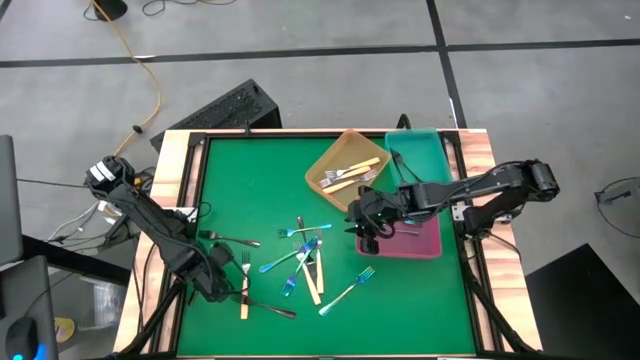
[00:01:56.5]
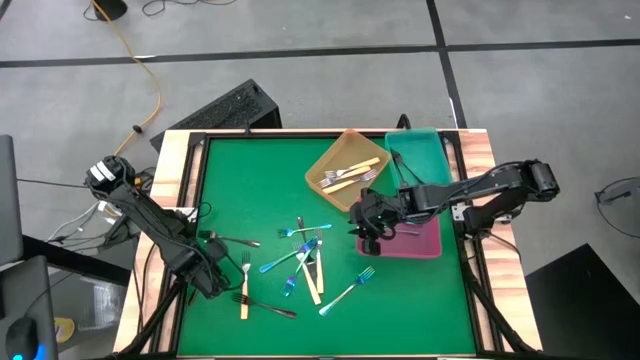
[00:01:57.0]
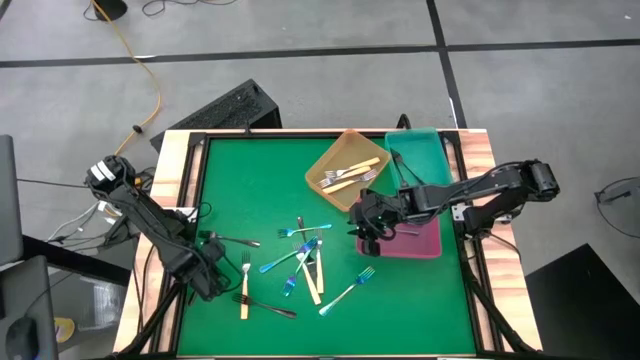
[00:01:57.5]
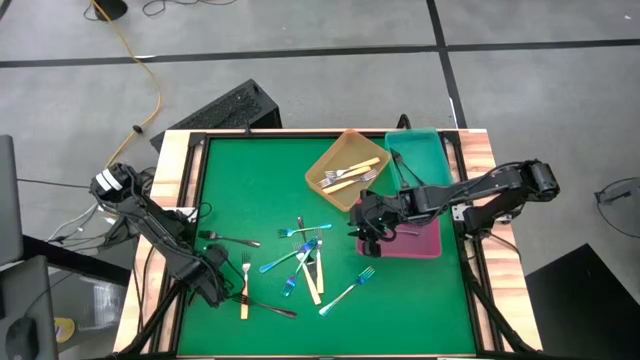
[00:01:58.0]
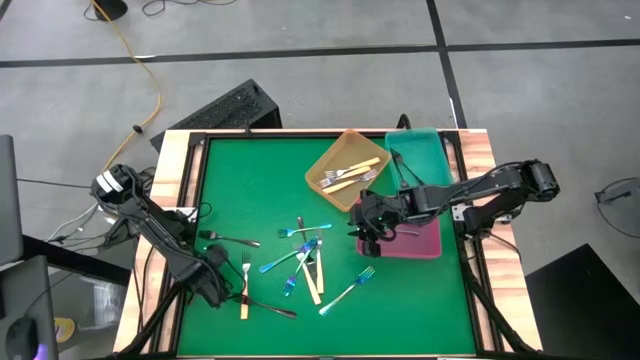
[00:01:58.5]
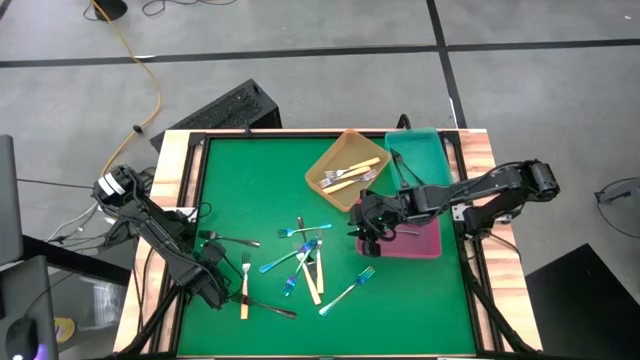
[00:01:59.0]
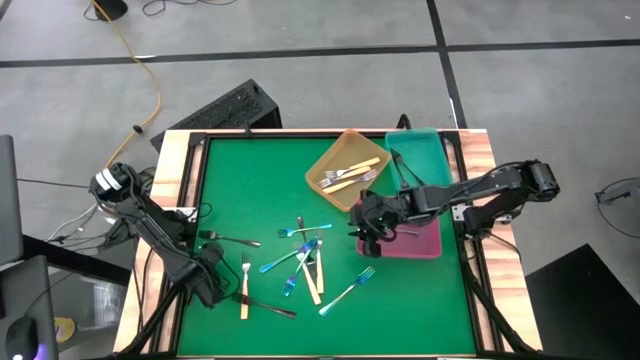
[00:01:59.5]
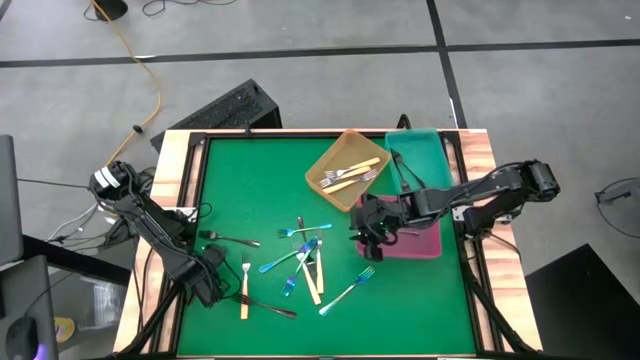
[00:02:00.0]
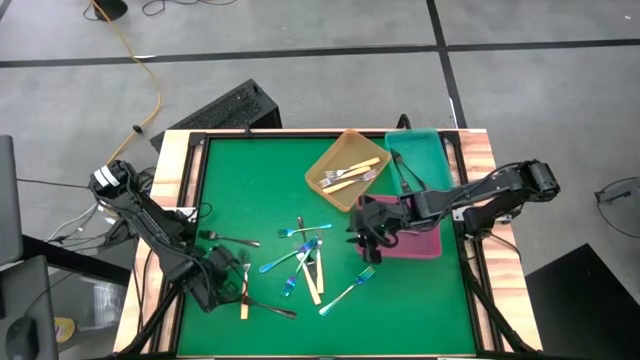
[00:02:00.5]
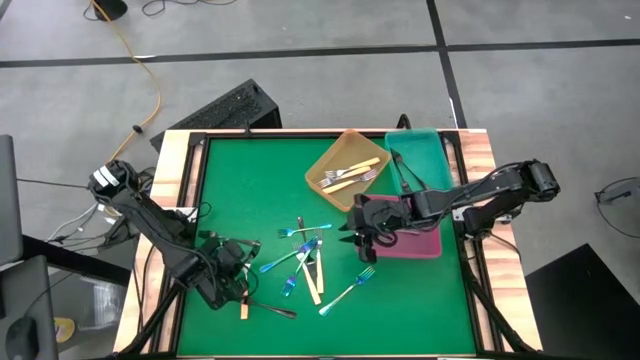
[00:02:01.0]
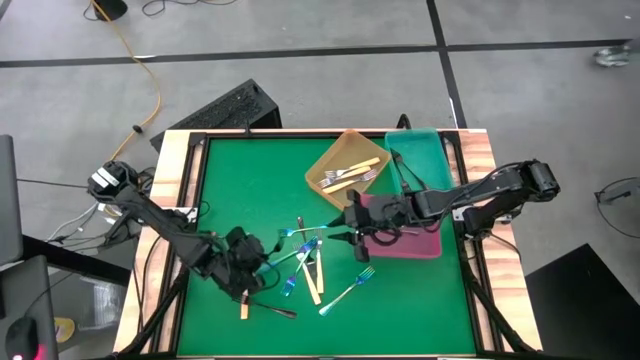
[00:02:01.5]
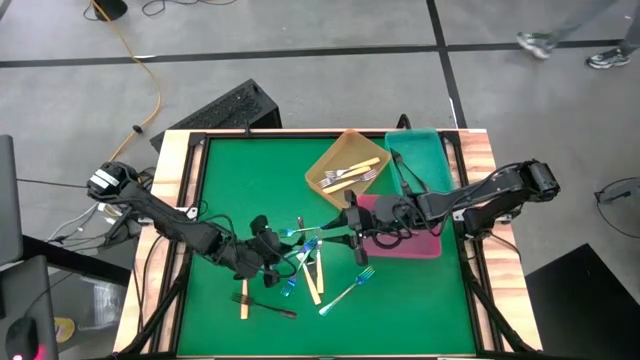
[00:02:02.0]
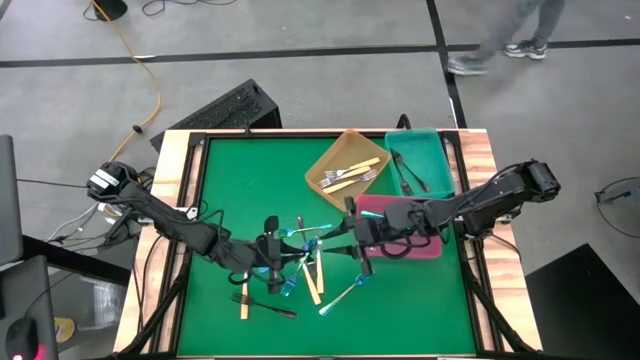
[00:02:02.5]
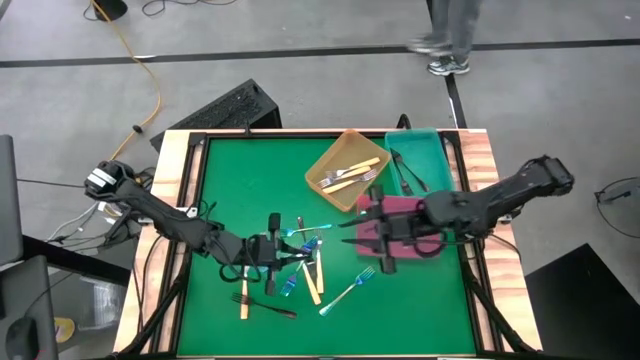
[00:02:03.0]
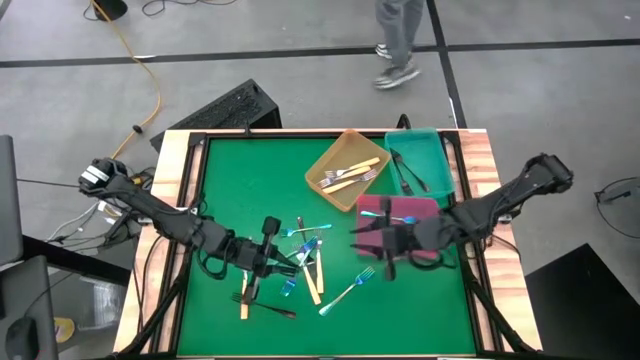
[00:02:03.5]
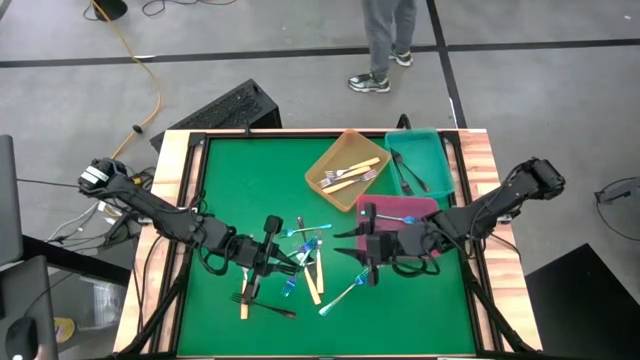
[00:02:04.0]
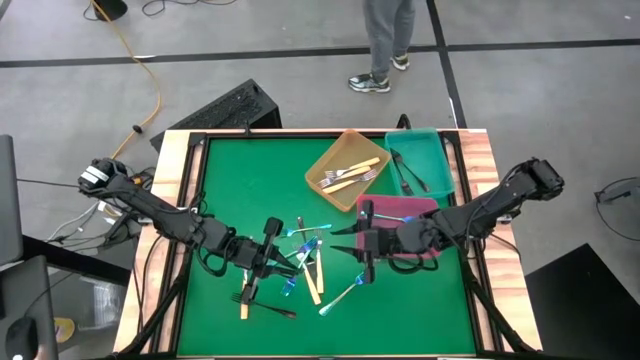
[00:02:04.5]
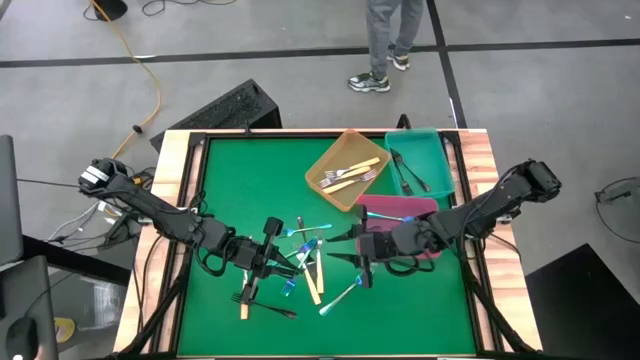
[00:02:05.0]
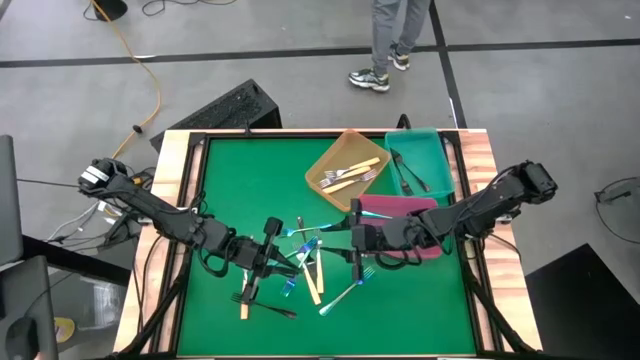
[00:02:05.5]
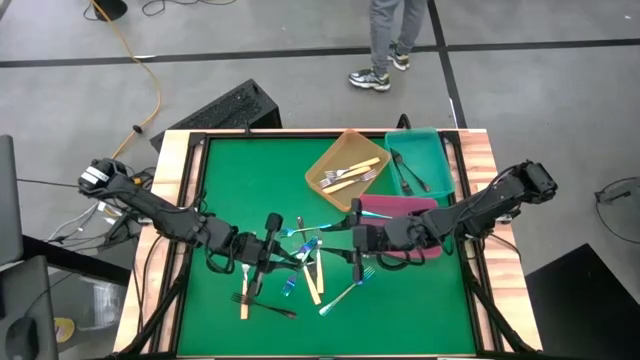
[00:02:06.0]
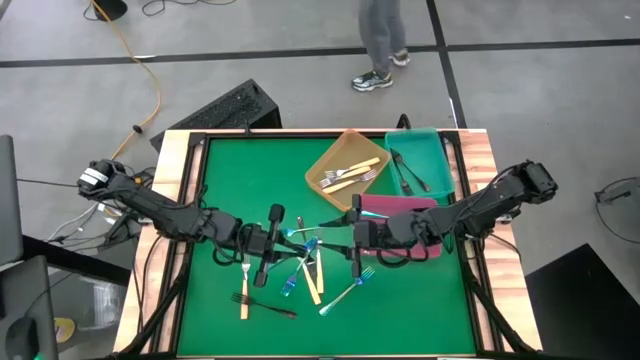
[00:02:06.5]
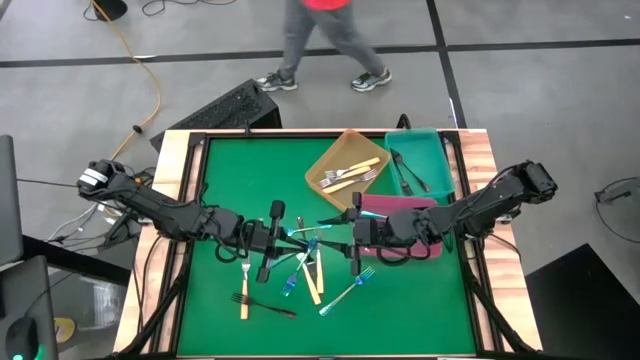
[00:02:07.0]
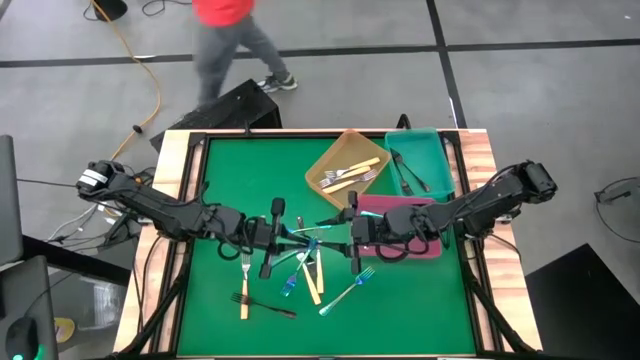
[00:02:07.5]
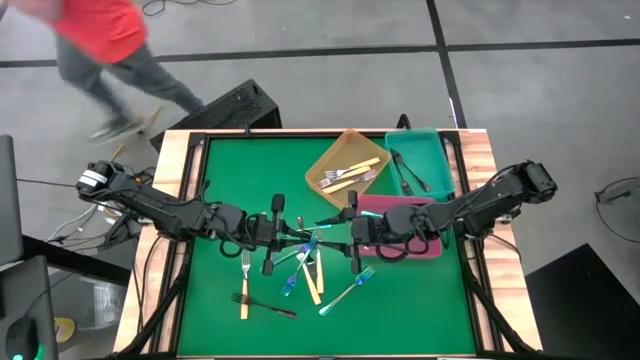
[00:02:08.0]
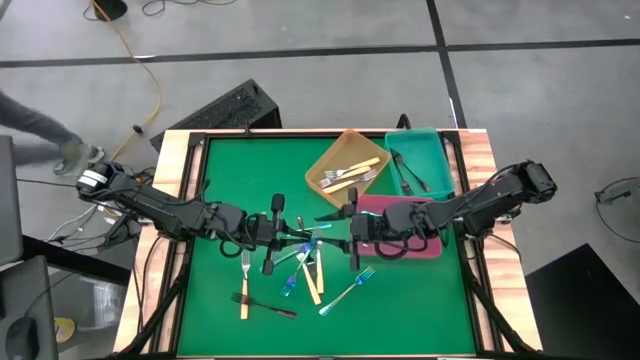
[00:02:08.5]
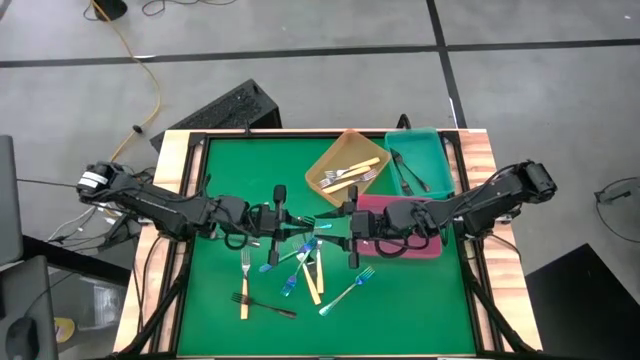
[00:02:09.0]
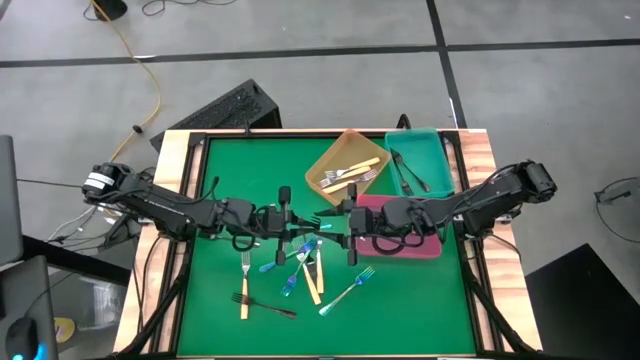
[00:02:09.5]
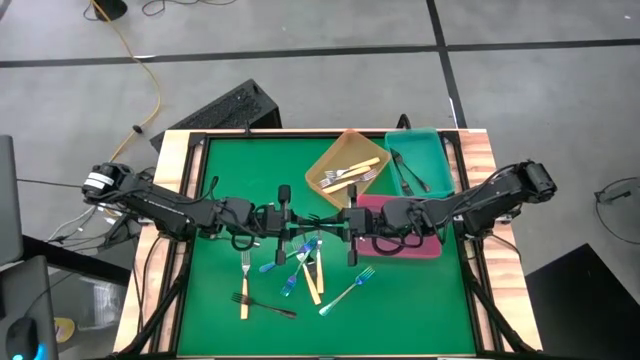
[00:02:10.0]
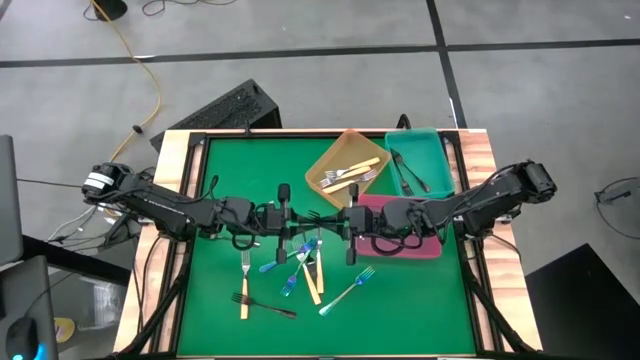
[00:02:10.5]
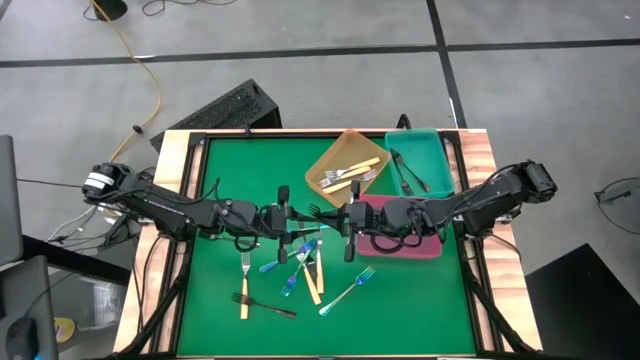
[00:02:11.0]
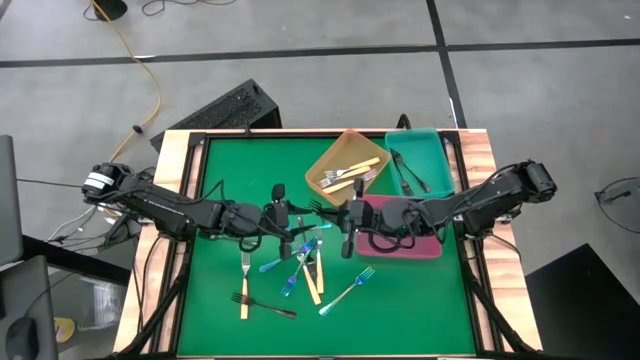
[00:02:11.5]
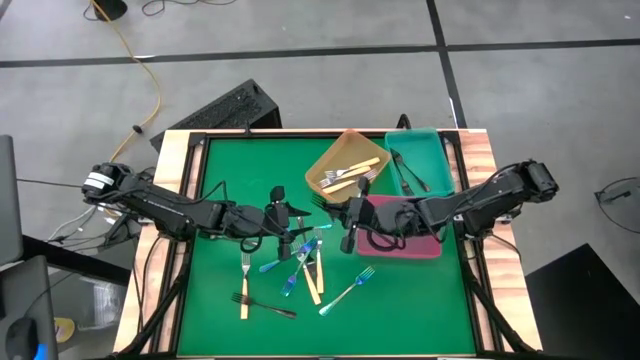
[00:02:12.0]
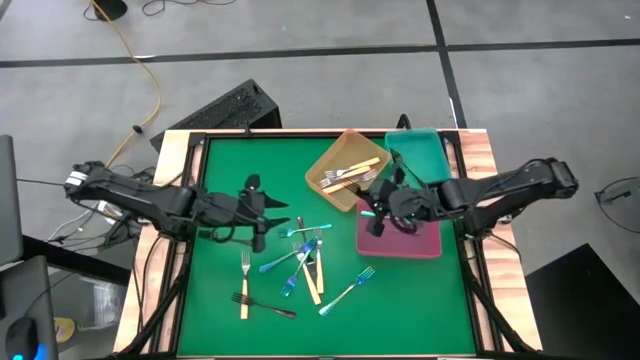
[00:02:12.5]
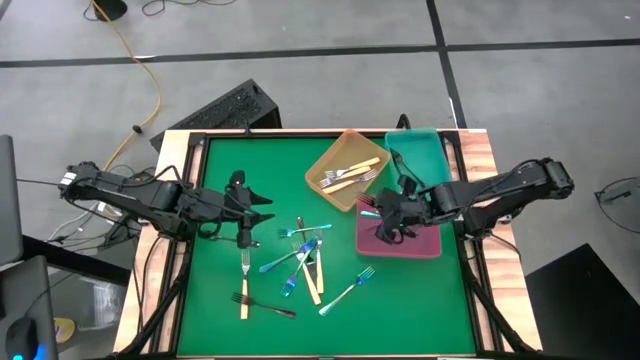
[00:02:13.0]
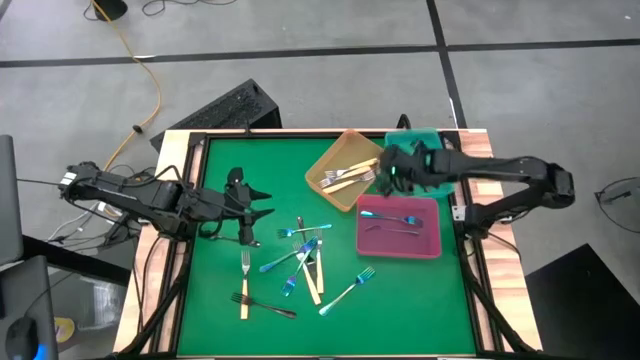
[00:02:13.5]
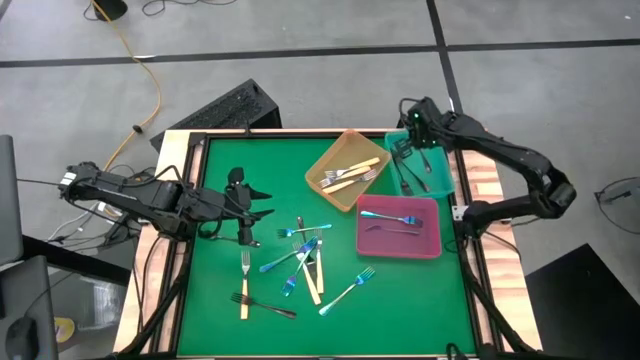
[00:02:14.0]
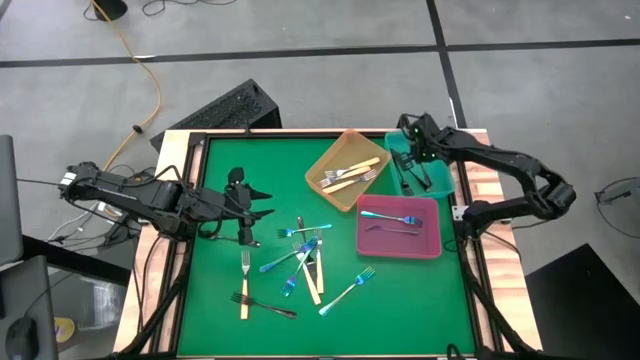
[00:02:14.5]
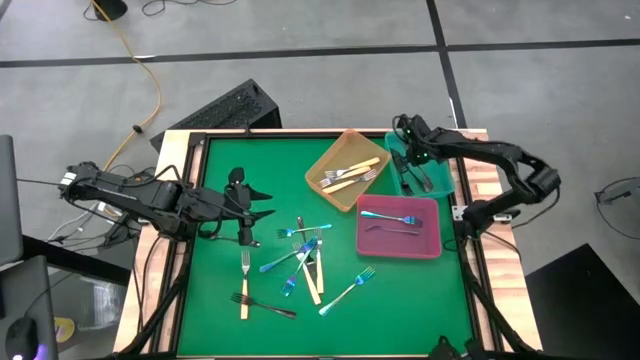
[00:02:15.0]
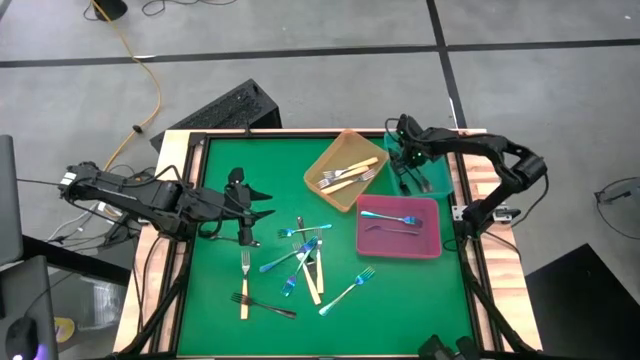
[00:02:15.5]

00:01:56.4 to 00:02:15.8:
Task: Sort silverware by color (type)
Put the black fork into the blue bin

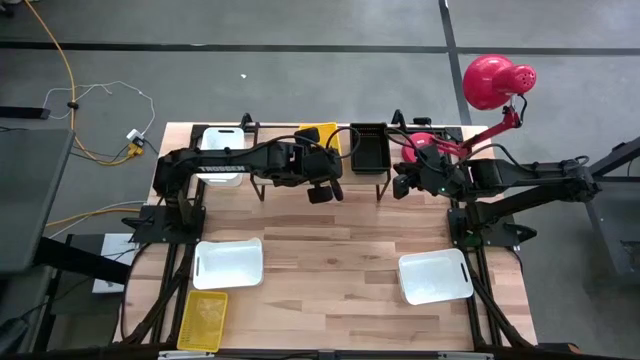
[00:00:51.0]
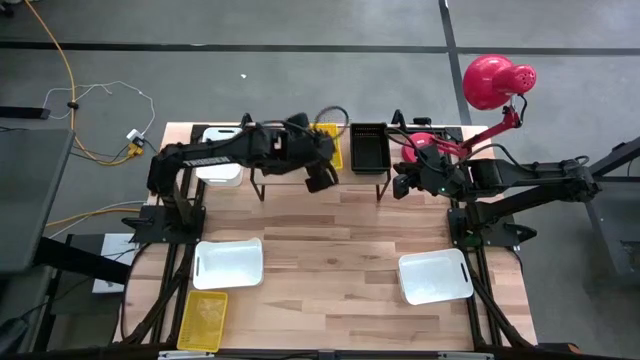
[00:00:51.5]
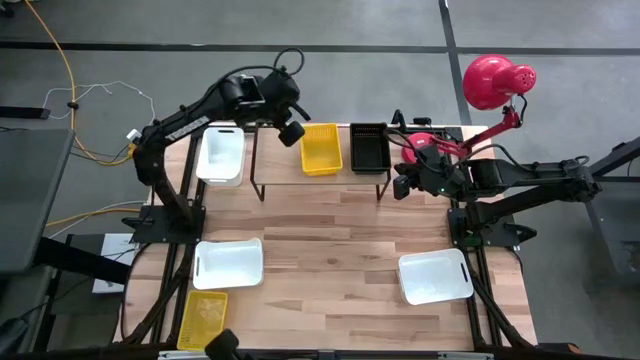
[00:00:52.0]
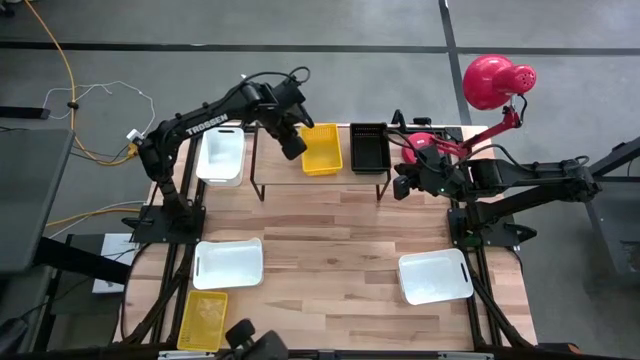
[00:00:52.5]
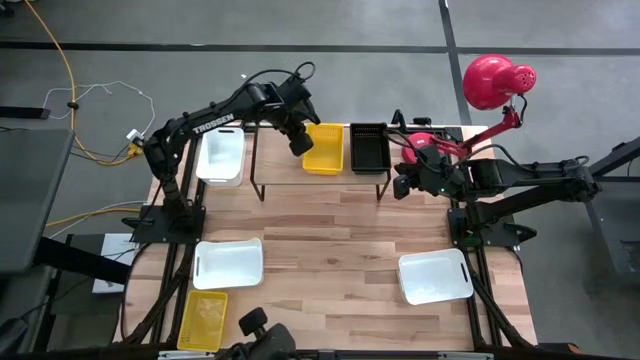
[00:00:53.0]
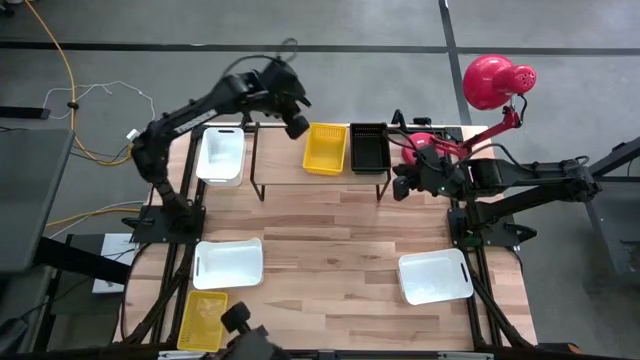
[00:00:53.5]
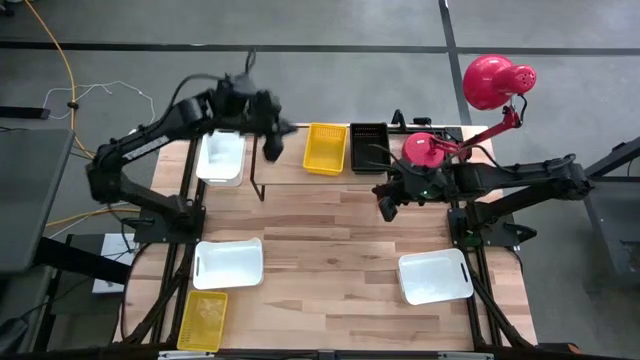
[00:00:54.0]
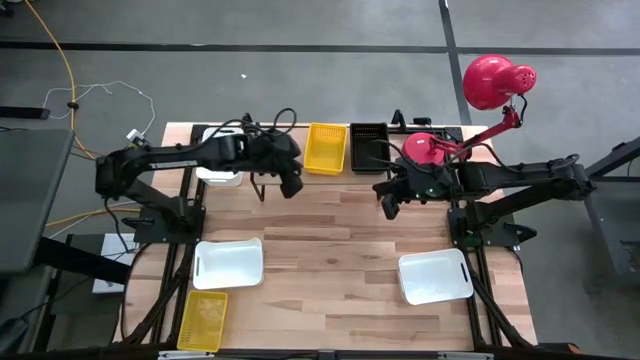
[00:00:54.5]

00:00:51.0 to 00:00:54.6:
Task: Stack baskets on shelf by color
Adjust the stacked yellow bins
